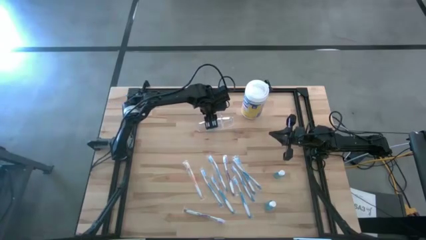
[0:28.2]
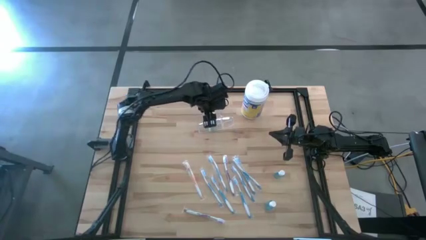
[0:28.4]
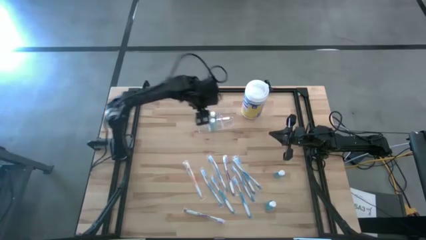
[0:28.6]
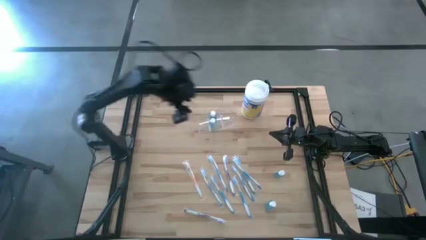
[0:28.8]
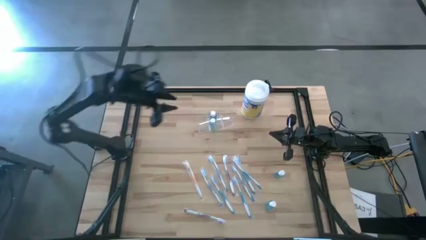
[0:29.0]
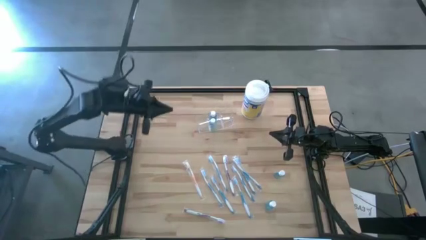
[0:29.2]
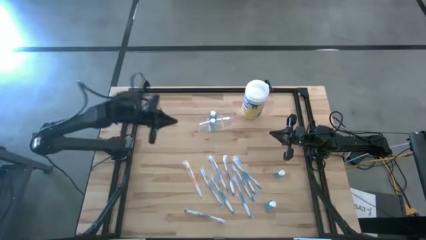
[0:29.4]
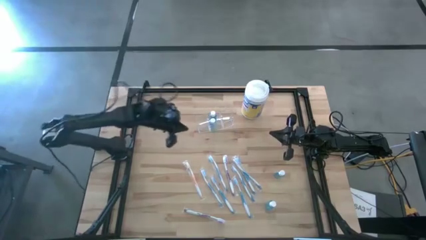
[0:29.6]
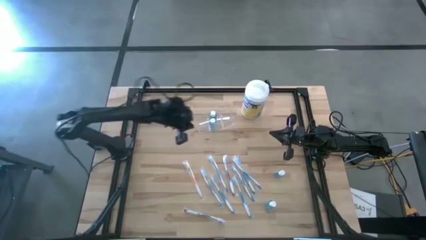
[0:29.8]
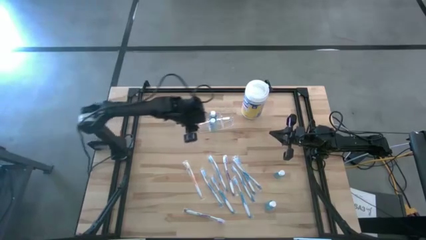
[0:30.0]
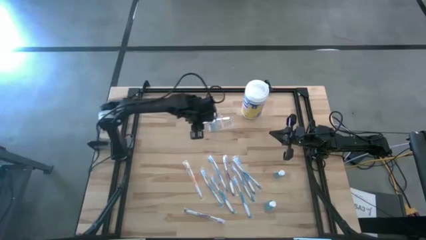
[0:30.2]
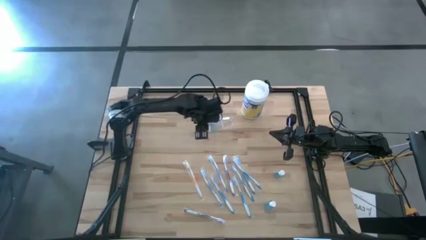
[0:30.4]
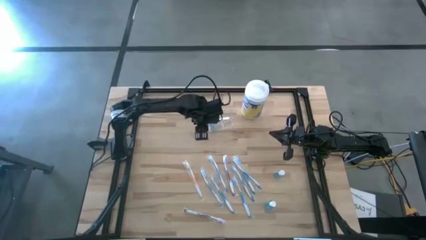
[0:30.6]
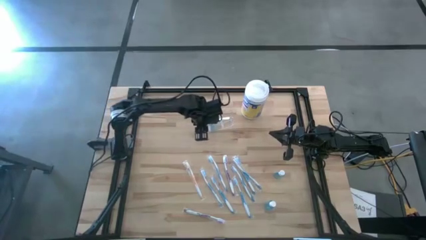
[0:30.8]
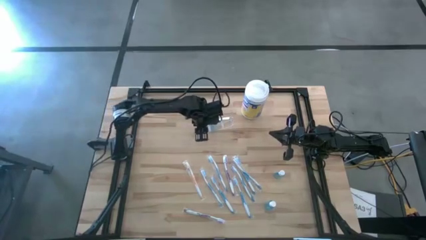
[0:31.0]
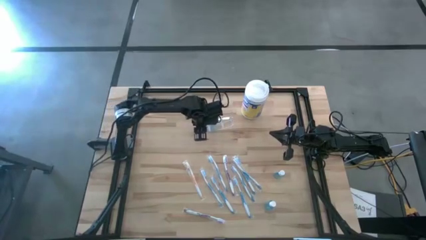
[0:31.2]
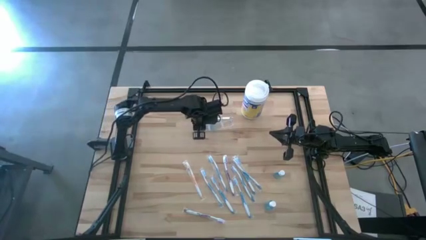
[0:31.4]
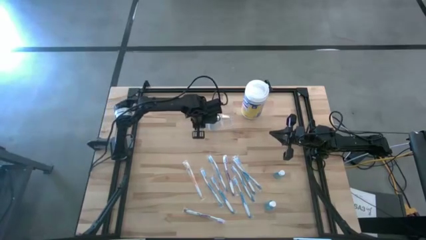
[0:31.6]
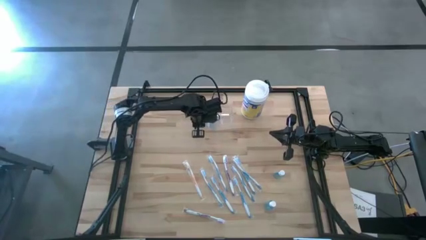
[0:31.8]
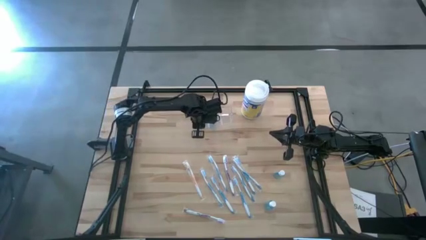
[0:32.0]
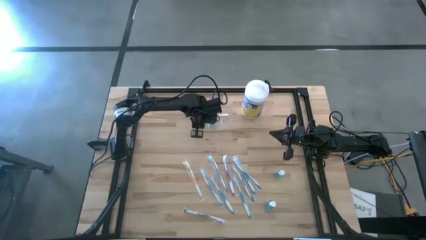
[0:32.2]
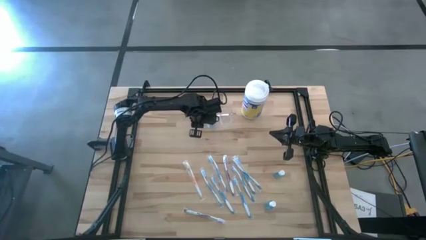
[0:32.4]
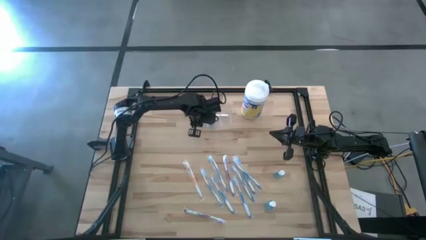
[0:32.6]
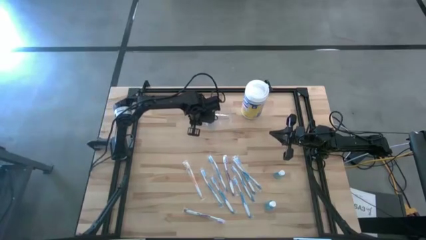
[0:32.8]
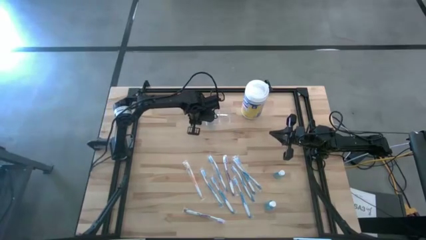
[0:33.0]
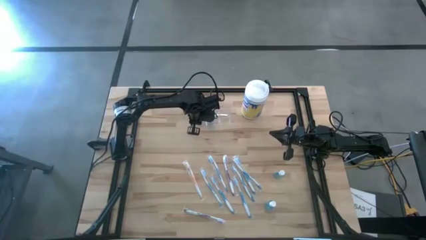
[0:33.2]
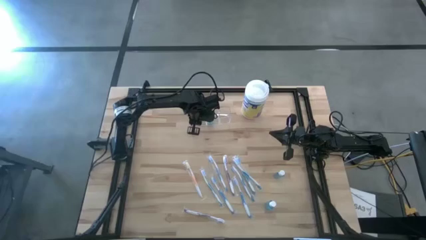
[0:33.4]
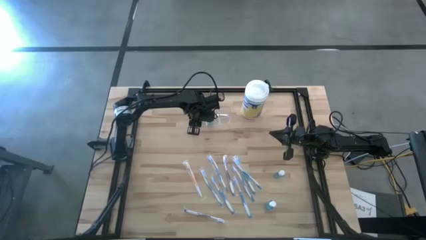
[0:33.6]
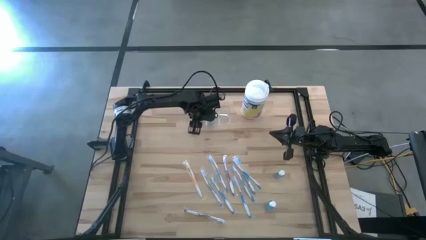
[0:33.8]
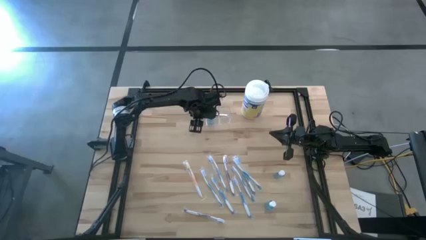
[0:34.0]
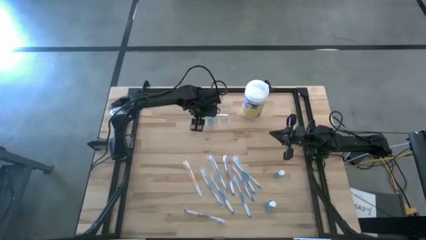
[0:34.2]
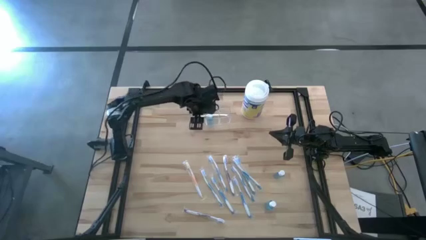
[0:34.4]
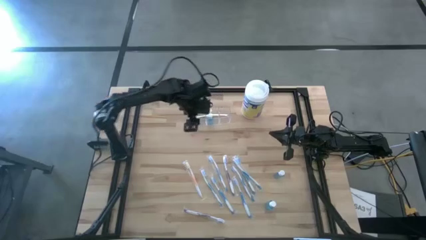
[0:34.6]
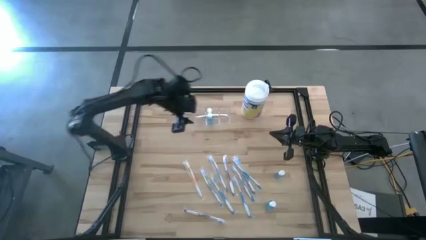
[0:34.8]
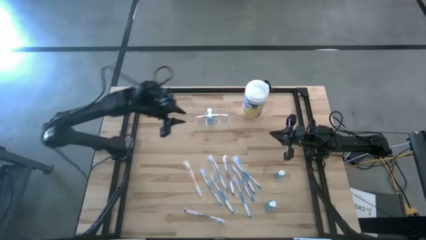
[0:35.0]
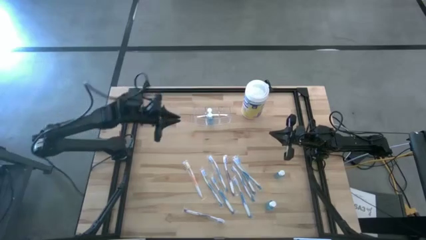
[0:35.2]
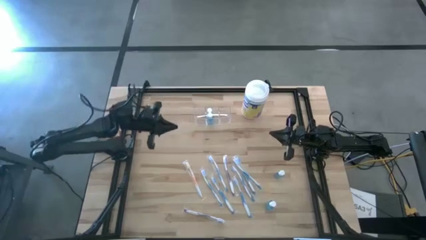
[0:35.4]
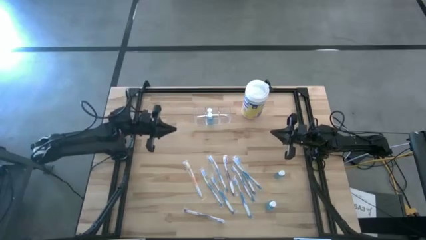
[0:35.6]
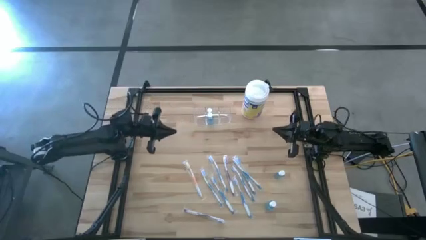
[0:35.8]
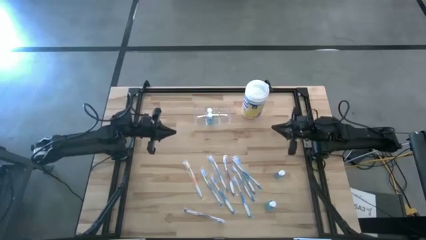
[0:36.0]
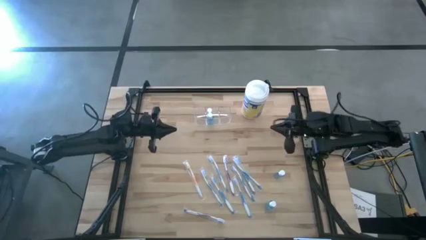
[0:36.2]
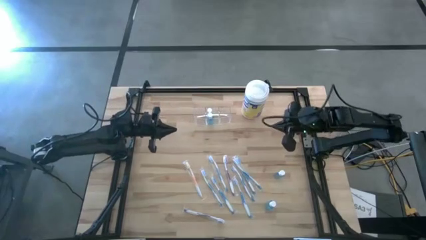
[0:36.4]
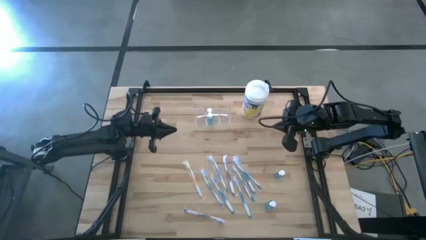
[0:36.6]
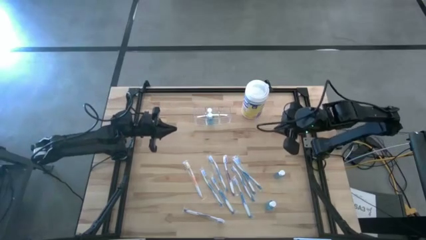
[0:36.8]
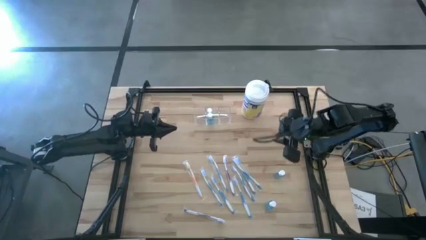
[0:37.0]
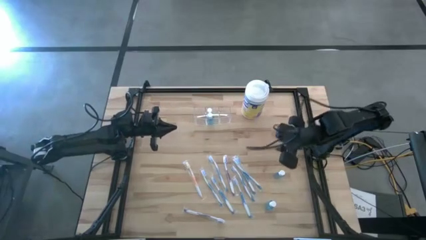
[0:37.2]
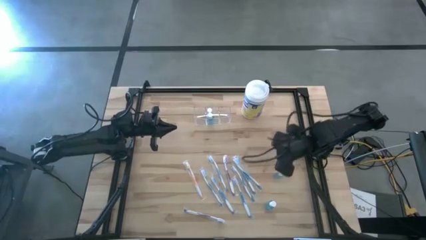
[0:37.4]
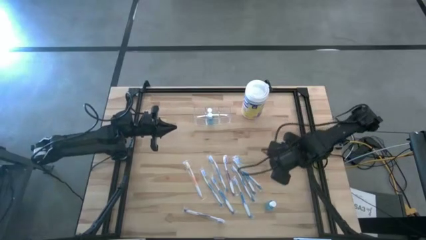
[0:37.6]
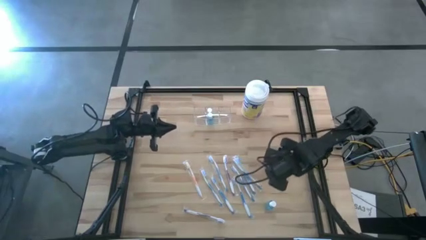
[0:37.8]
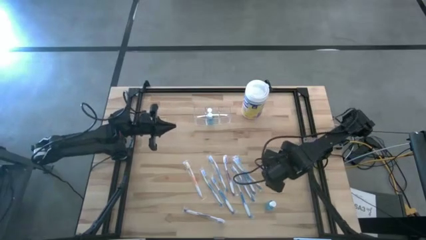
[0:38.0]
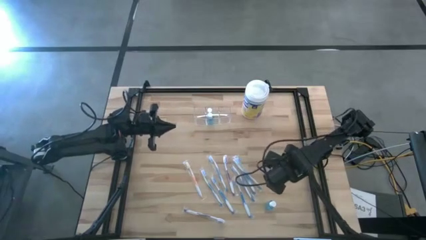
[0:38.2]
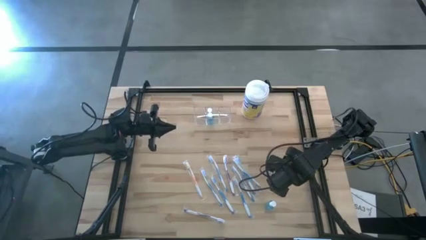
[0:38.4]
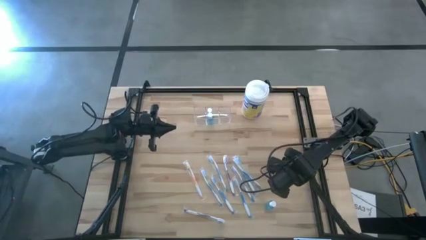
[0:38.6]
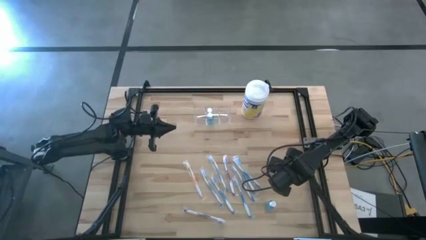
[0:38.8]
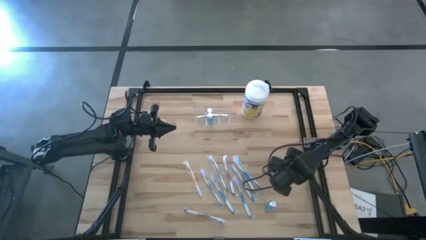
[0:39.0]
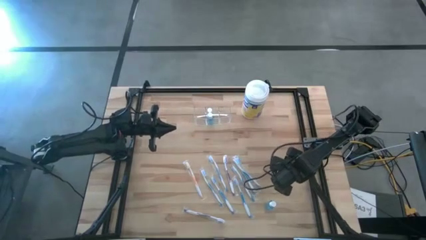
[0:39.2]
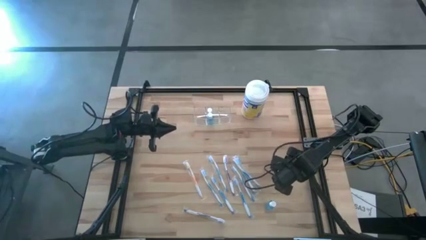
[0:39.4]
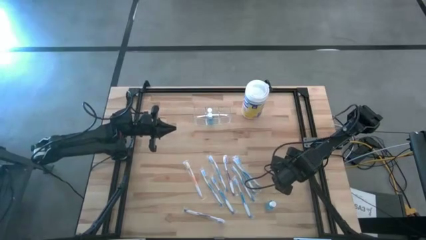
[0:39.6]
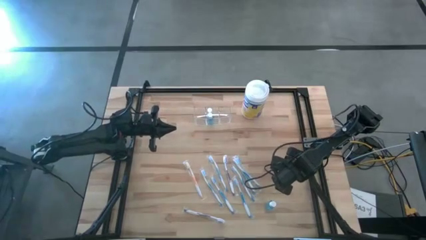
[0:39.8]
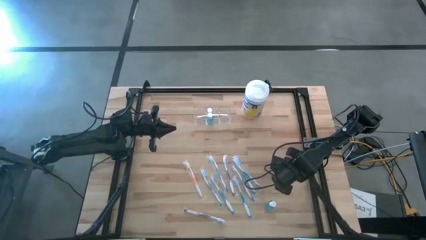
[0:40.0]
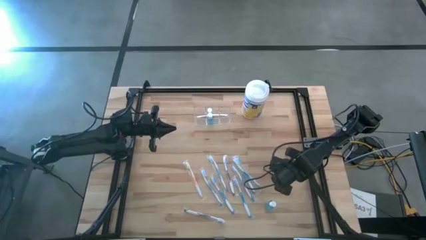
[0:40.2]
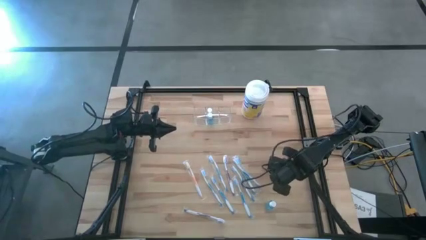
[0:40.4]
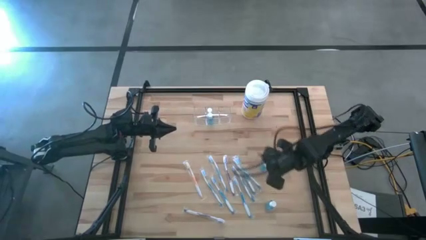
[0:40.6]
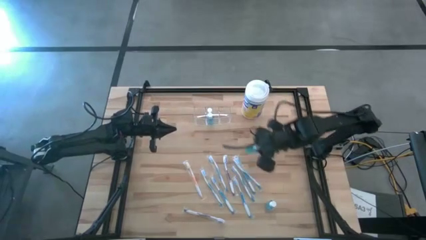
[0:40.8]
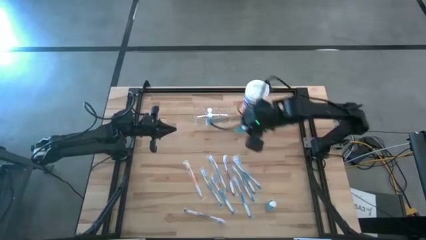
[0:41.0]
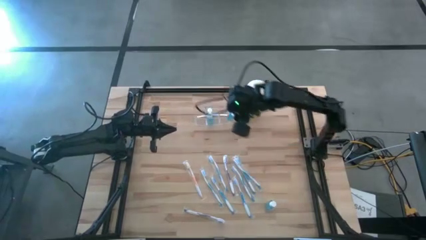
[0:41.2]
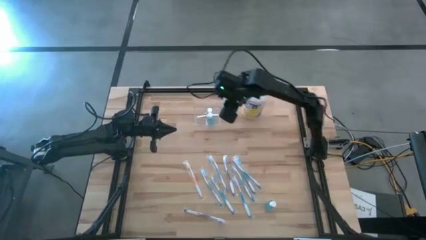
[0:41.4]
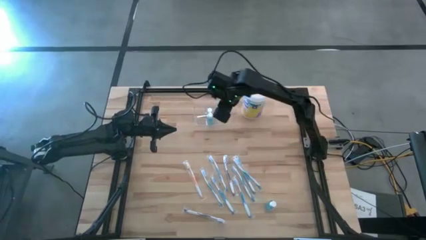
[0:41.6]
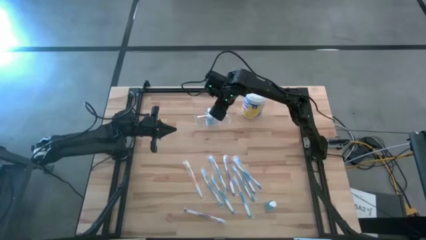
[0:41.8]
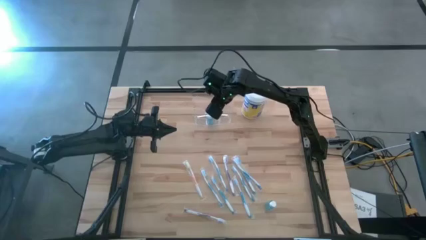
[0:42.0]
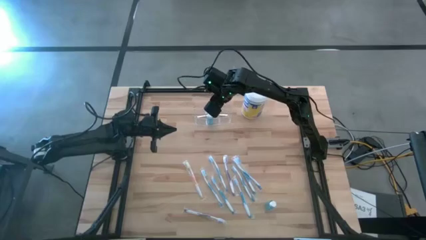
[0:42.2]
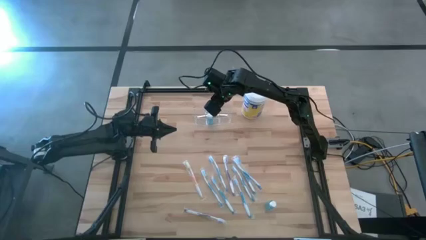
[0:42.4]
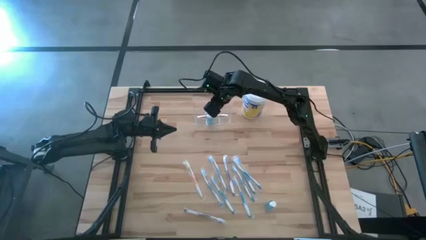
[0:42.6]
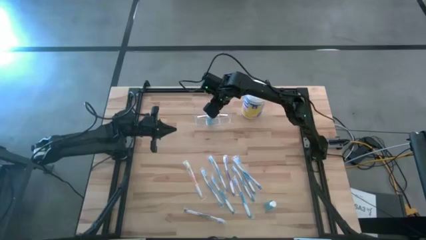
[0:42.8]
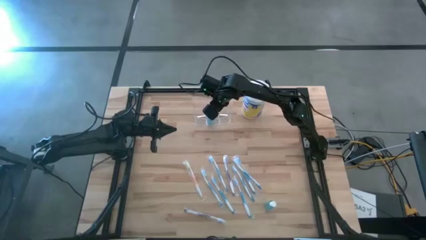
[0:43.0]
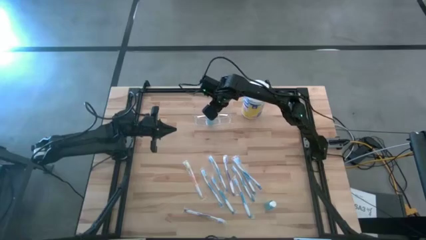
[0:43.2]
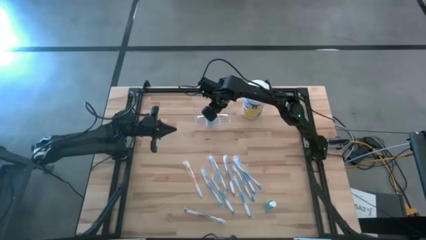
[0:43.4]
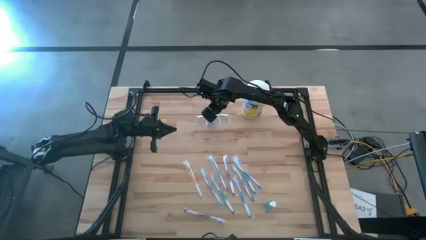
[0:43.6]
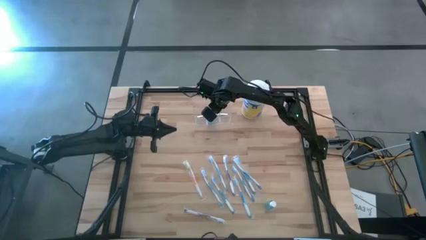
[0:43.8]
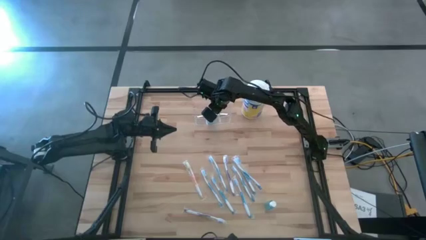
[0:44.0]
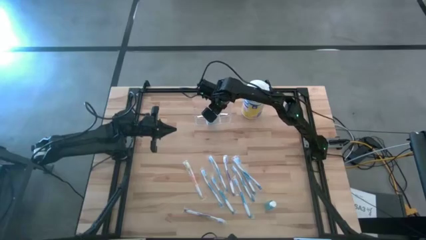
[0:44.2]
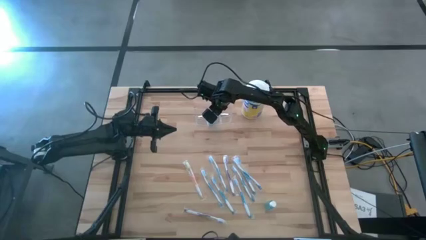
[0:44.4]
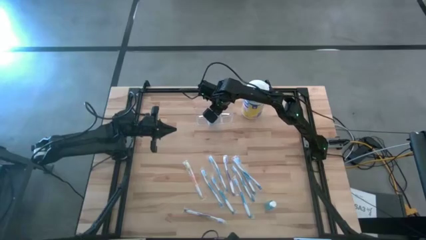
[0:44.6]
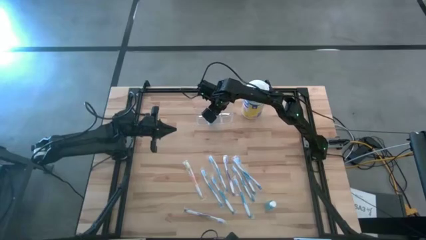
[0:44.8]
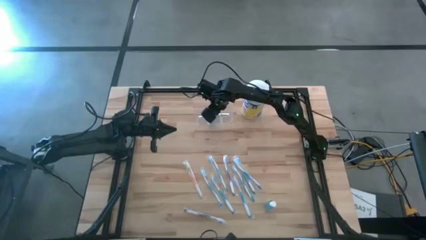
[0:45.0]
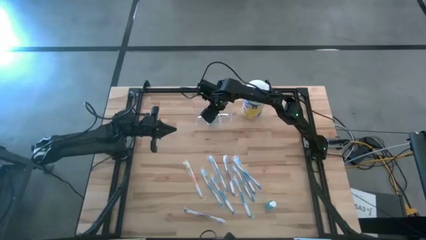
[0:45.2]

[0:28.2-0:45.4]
Task: Pick & Place toothbrushing station
Put the blue mouthwash bottle into the transparent toothbrush holder
